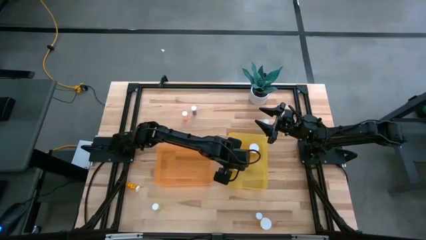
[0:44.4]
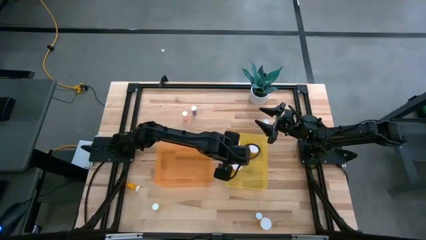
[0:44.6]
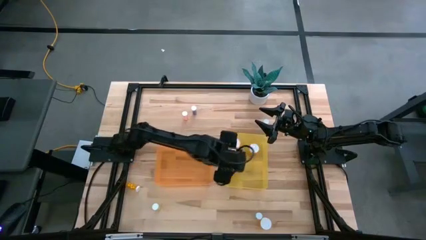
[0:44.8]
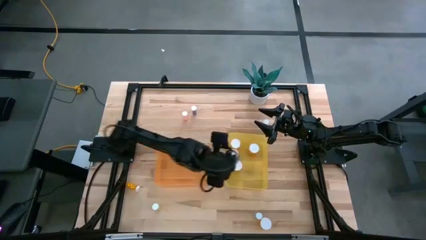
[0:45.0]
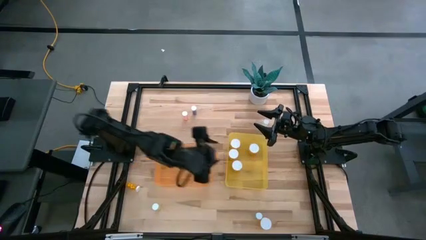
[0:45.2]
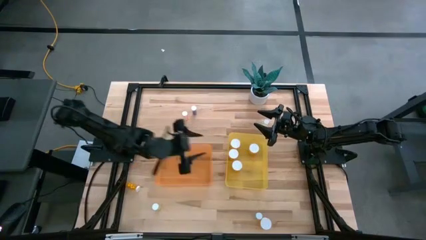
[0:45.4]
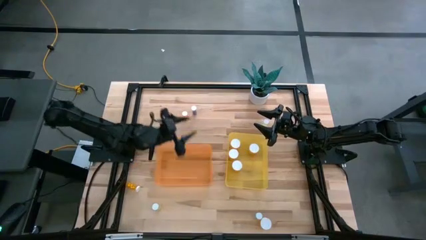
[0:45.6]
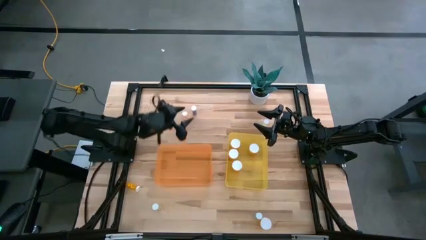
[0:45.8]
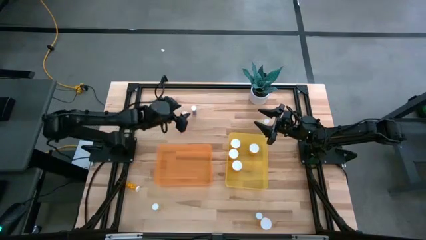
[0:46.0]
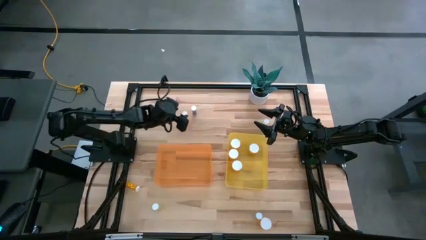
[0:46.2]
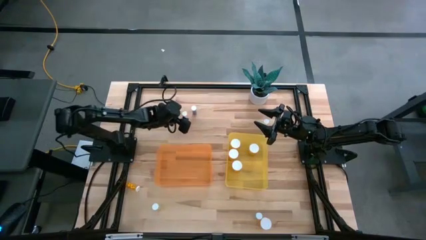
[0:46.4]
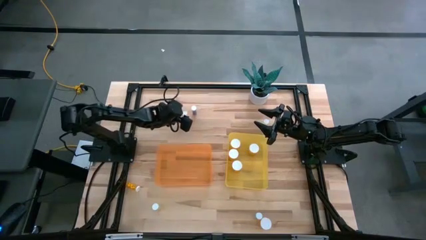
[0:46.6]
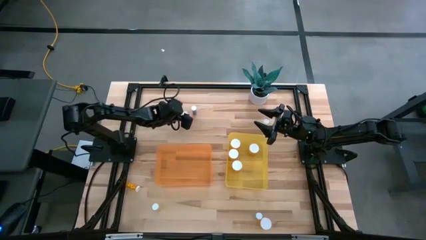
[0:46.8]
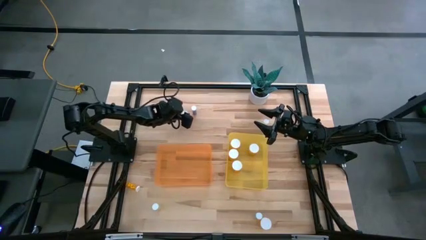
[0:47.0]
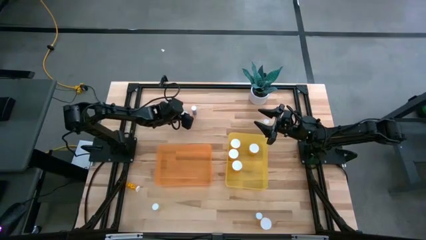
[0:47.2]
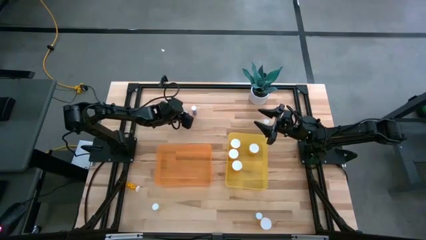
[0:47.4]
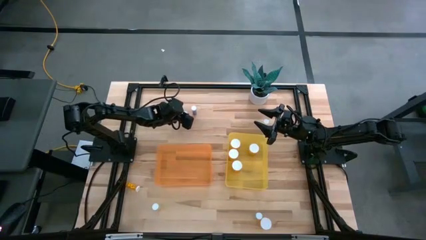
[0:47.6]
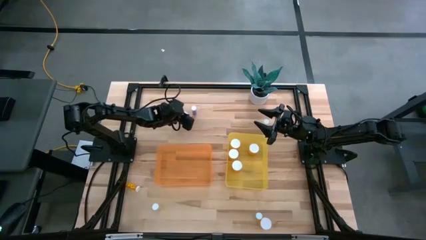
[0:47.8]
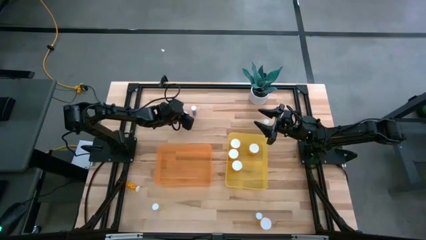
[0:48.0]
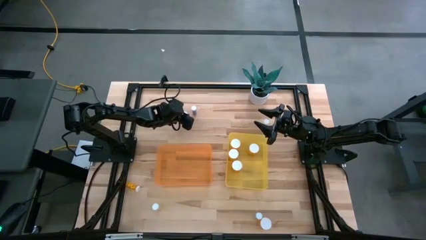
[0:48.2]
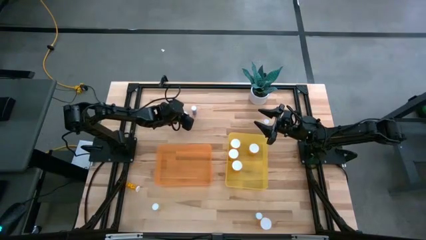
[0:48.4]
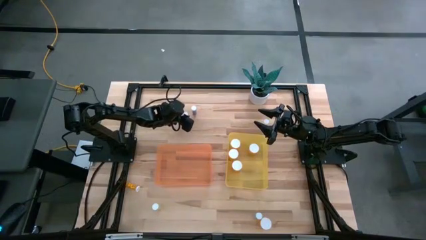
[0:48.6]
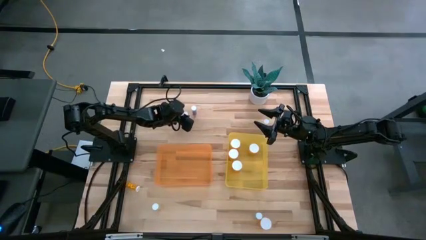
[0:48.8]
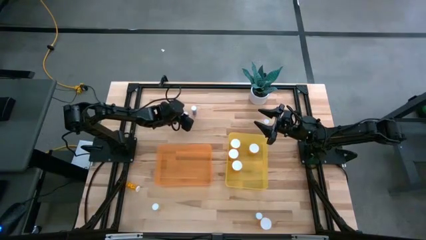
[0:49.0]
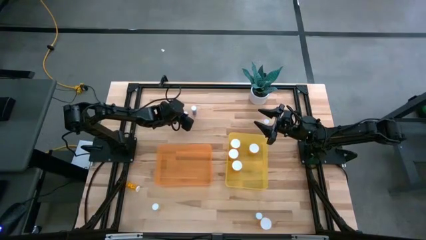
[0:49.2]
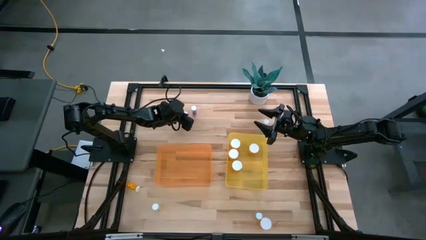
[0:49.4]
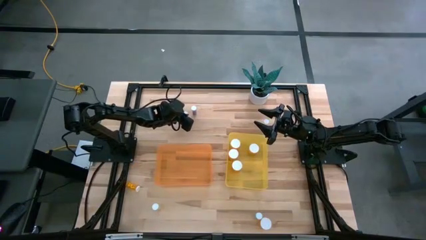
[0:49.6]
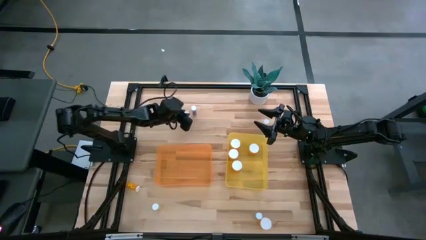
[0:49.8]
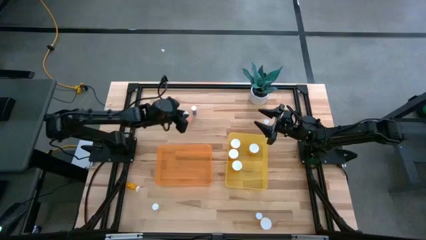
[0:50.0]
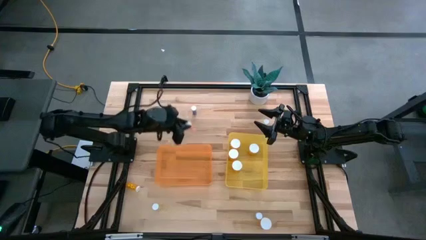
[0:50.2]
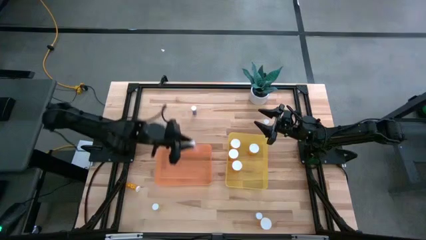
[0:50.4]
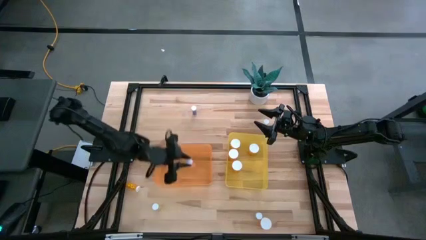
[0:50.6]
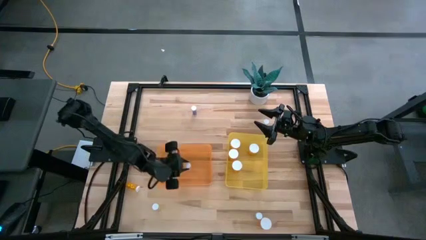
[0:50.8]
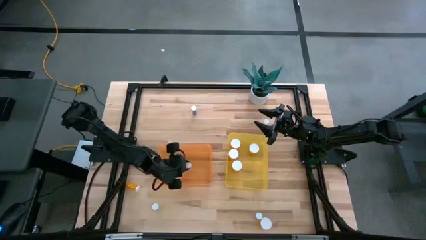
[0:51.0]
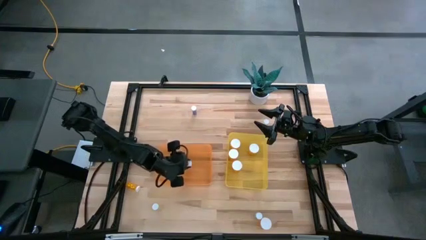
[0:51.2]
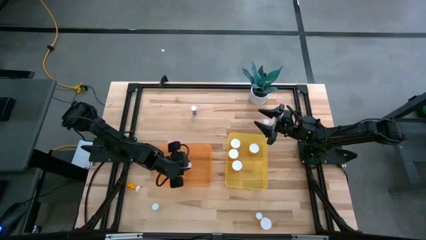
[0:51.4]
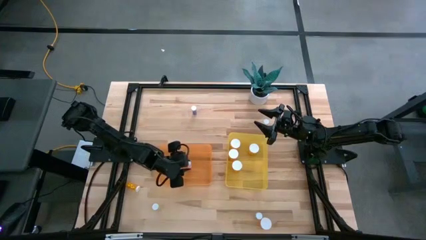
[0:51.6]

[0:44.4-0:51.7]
Task: Pick and place medicine bottles into bin by pill shape (circle, oval)
Put the pink tablet bottle into the orange bin

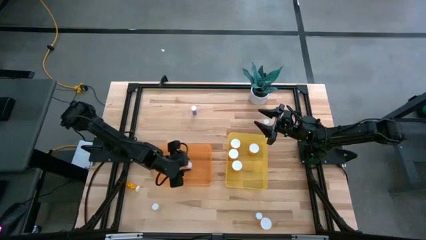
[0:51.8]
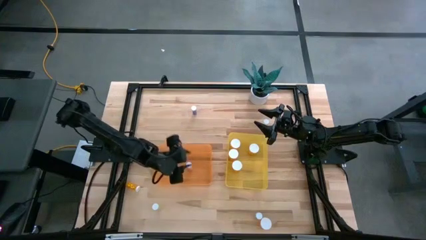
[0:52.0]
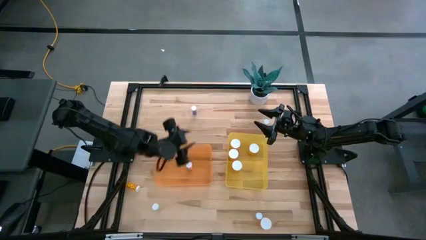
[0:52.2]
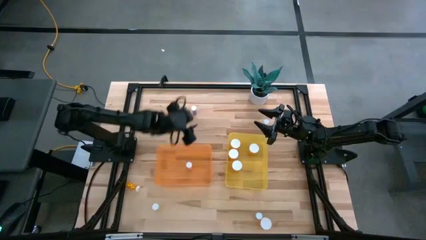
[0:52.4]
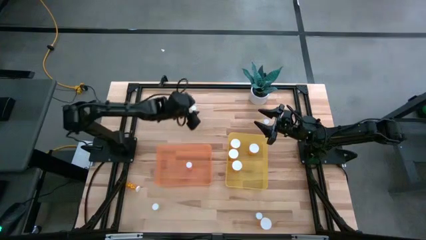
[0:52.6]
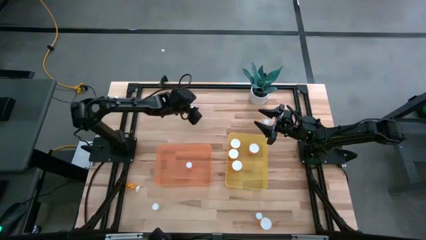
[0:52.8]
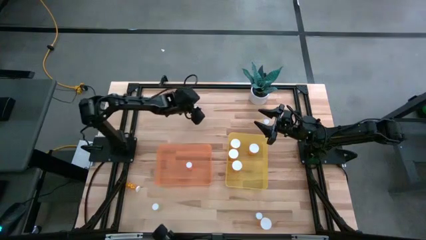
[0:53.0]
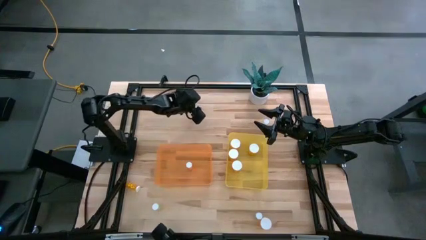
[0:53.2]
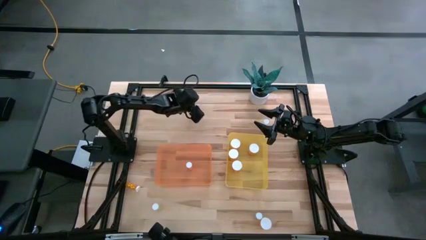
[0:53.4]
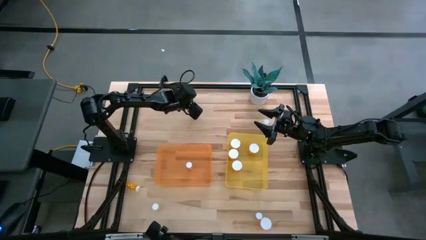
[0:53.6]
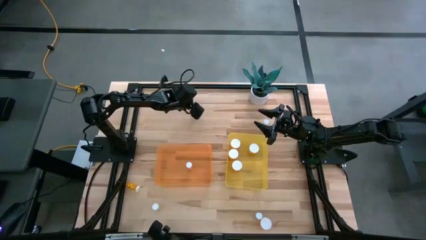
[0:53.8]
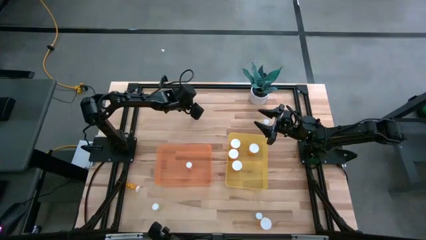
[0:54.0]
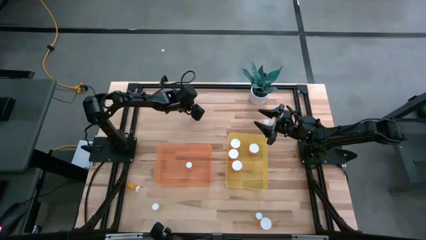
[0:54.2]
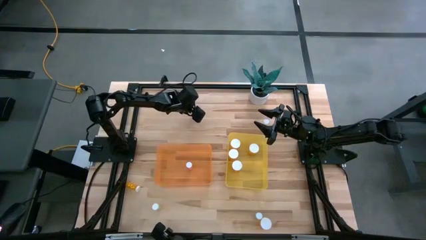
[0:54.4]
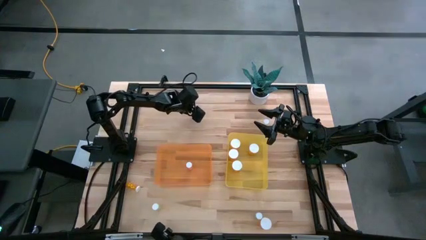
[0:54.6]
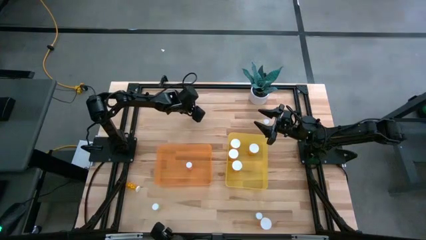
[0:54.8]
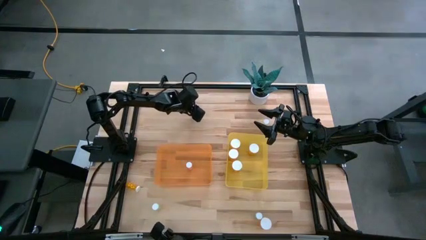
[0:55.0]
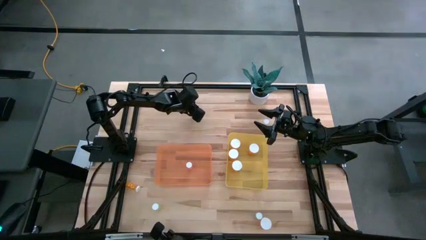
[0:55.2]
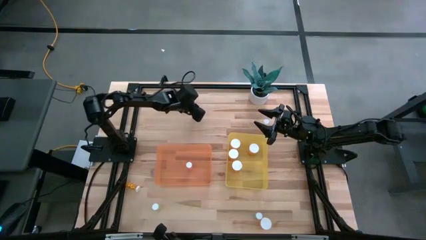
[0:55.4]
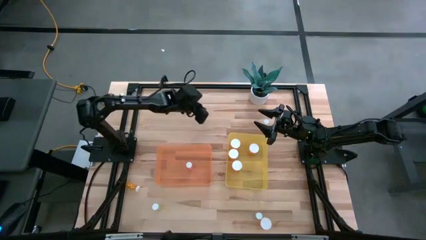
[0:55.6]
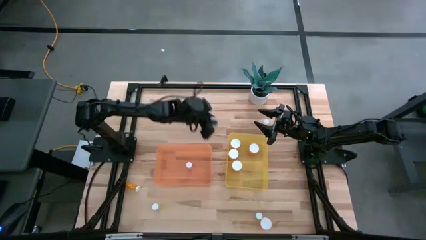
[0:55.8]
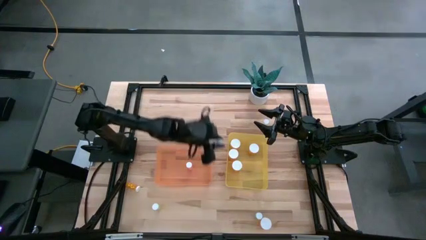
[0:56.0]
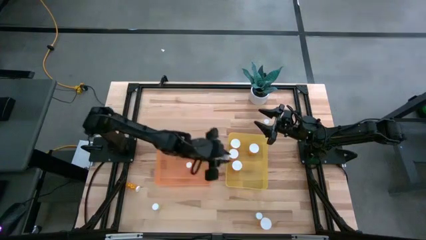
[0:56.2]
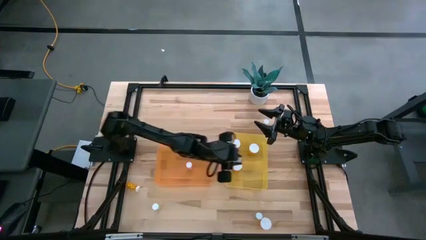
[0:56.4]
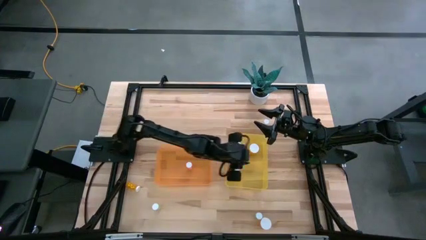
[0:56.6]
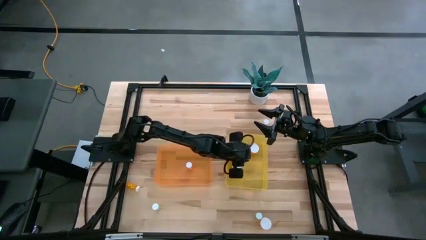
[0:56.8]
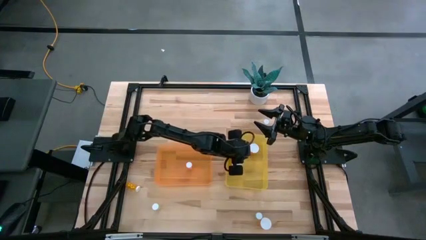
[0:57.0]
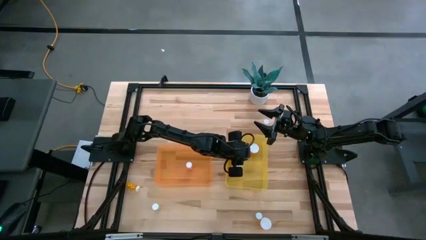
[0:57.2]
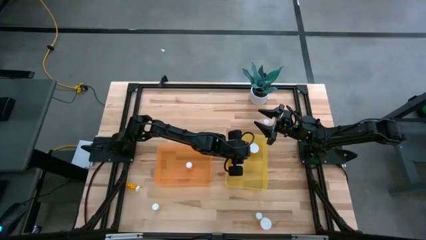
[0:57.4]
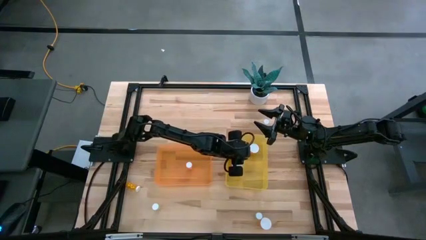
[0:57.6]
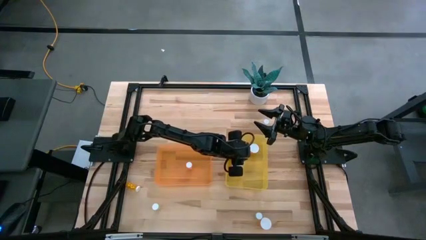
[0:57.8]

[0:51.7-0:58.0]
Put the blue capsule bottle into the yellow bin

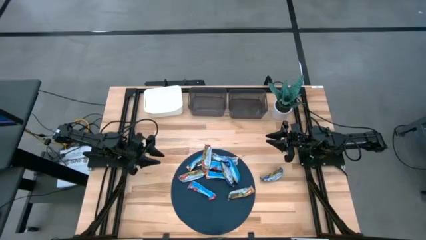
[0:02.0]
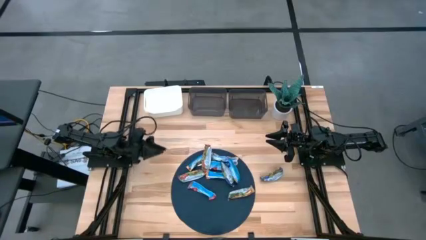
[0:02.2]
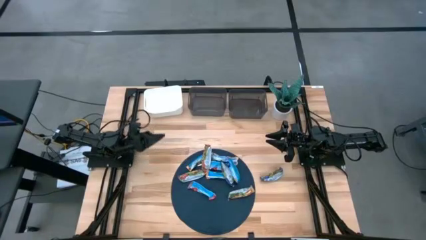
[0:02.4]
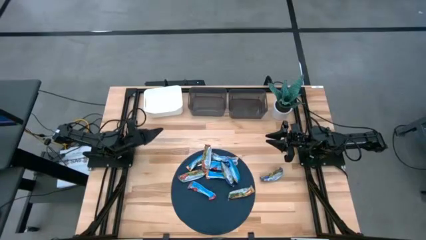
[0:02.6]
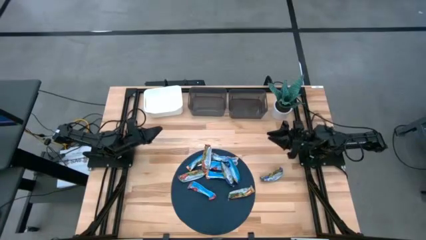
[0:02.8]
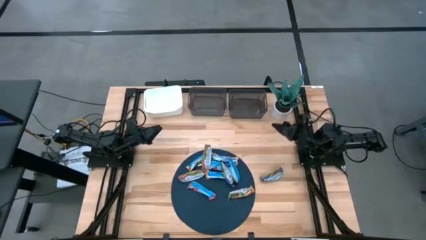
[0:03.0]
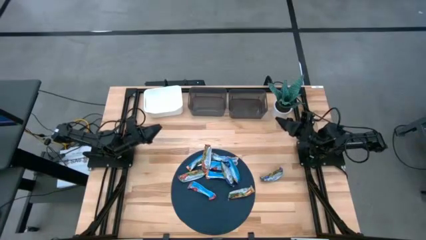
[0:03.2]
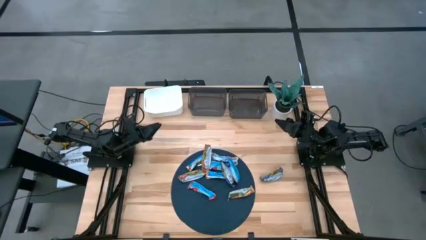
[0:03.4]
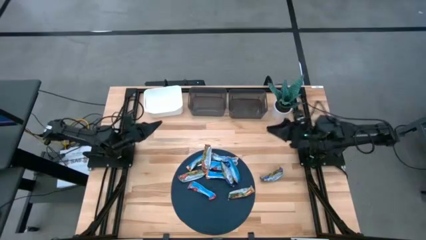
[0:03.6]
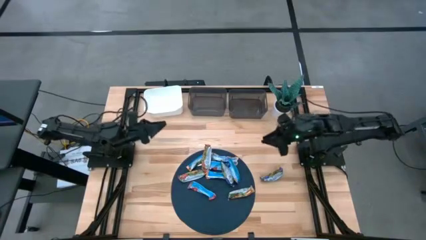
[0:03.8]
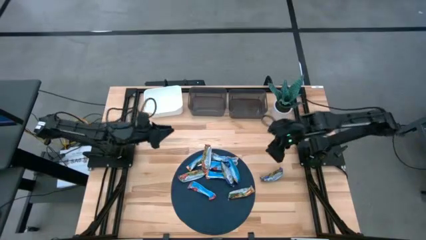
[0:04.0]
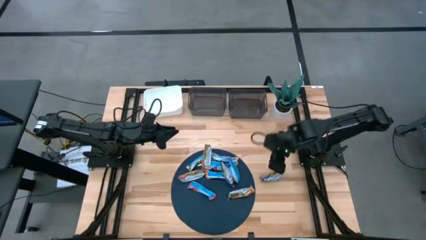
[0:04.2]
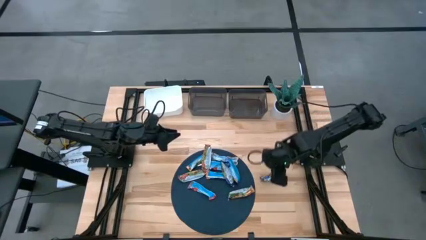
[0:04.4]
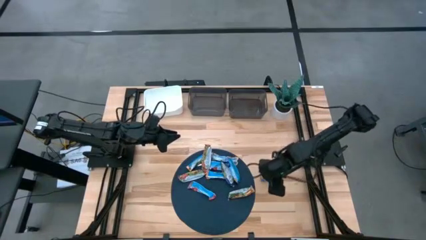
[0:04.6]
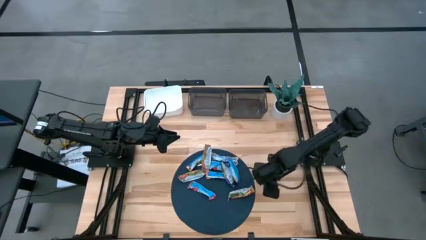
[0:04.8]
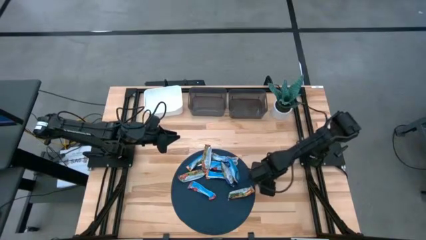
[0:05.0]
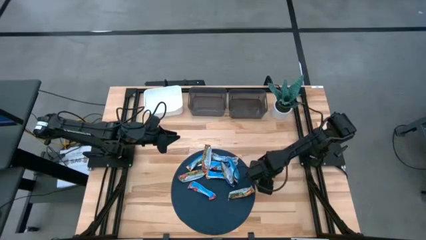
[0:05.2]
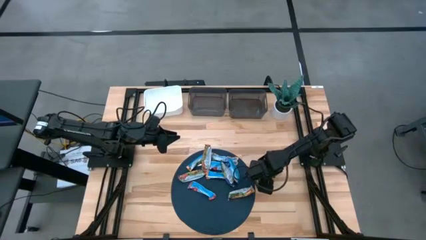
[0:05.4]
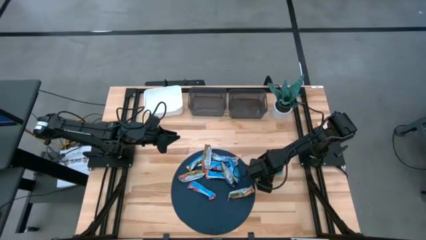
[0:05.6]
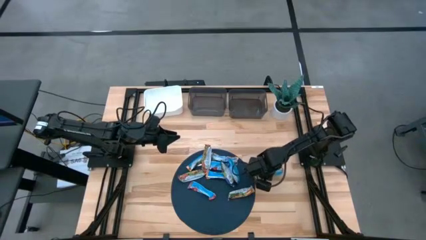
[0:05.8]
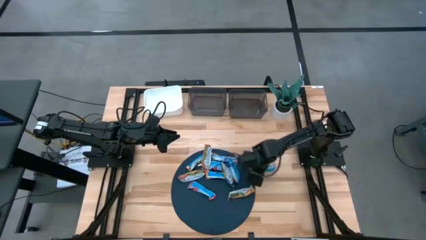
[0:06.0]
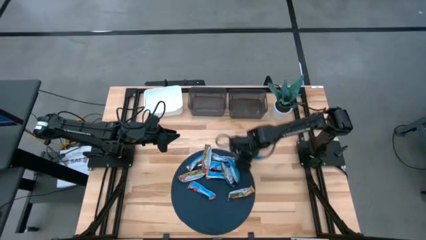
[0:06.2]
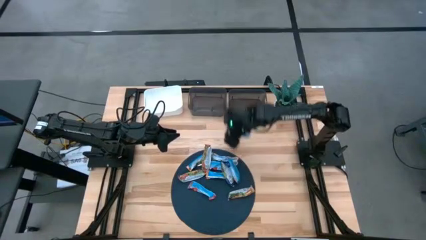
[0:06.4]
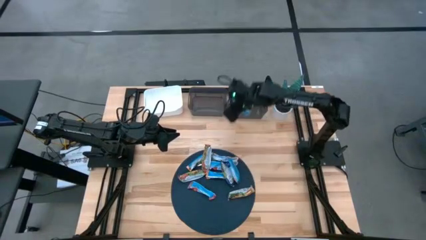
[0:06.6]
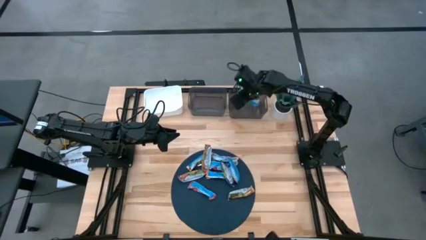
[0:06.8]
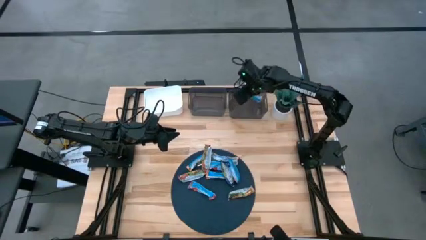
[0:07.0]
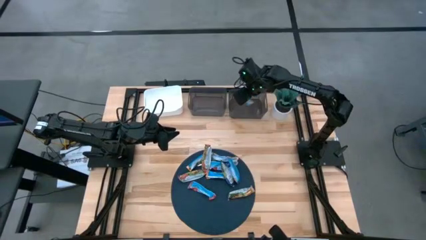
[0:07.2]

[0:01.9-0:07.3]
Task: Pick and place Granola Bars by type
Put the blue granola bar into the right black transparent bin
